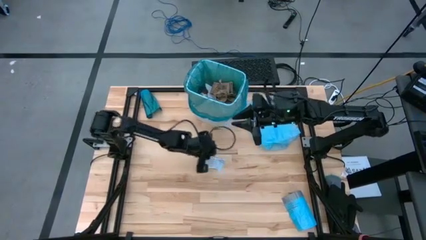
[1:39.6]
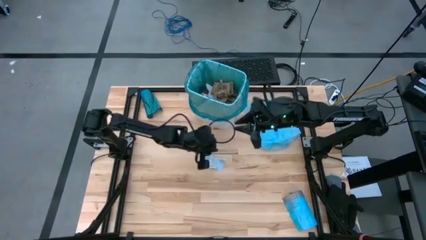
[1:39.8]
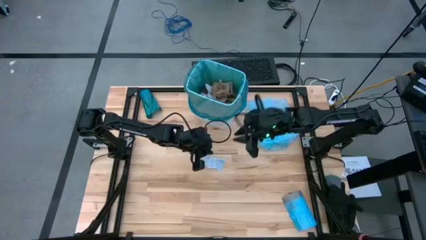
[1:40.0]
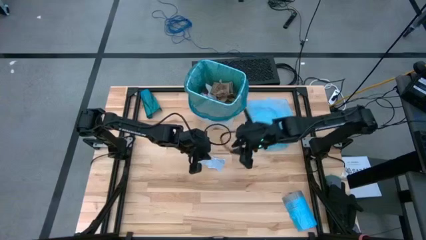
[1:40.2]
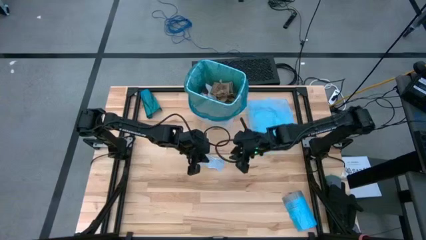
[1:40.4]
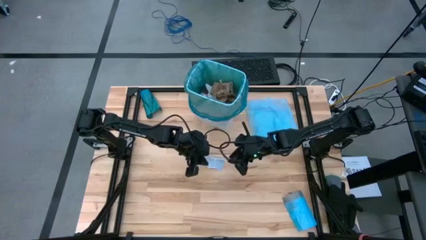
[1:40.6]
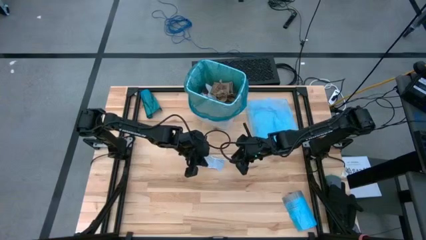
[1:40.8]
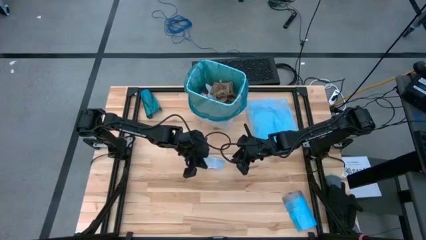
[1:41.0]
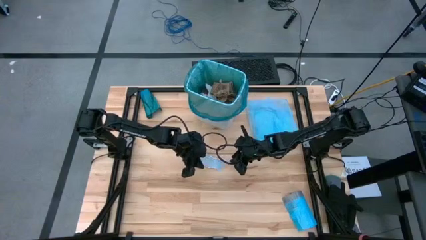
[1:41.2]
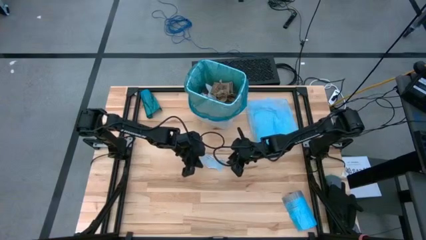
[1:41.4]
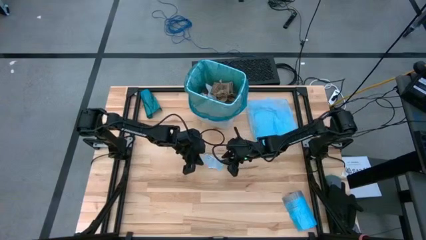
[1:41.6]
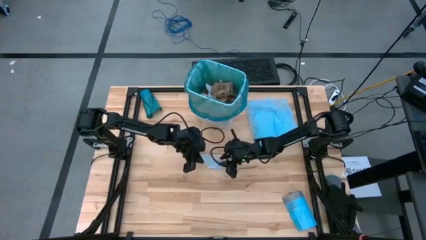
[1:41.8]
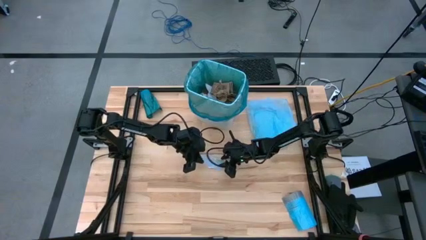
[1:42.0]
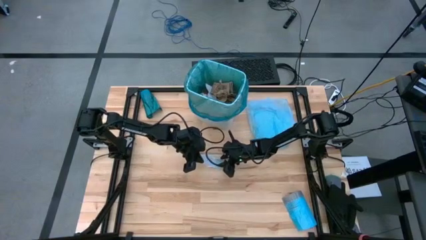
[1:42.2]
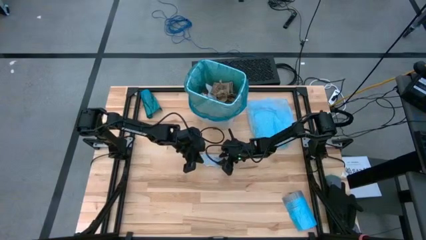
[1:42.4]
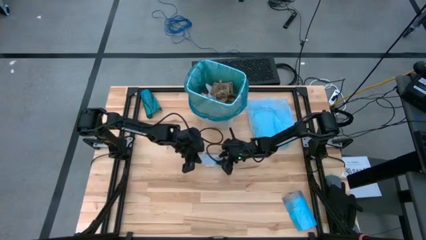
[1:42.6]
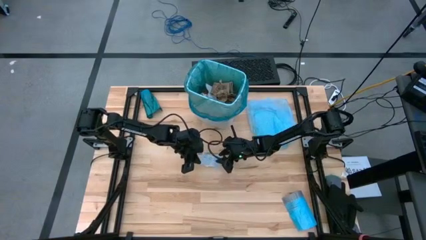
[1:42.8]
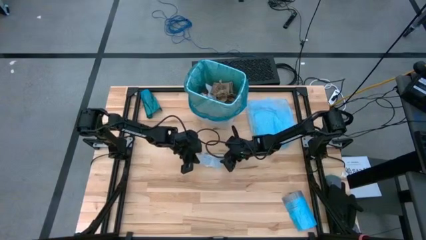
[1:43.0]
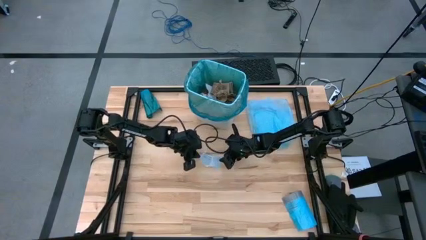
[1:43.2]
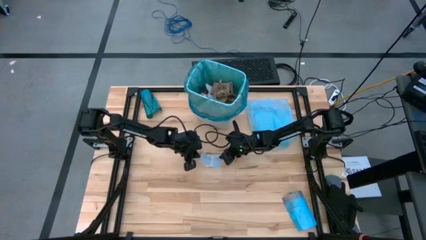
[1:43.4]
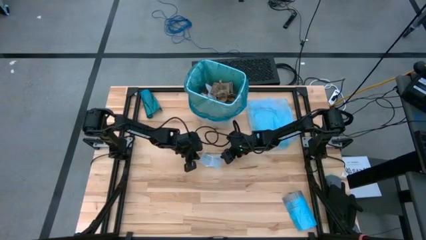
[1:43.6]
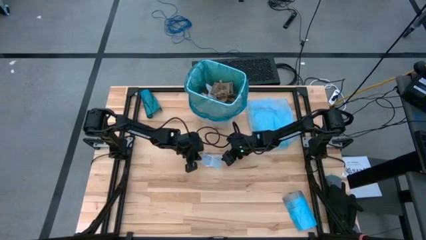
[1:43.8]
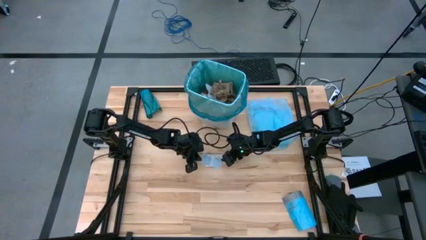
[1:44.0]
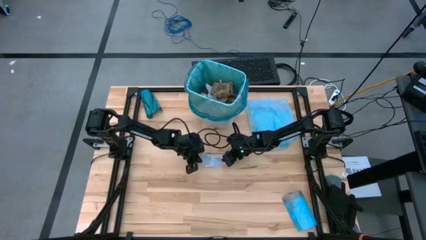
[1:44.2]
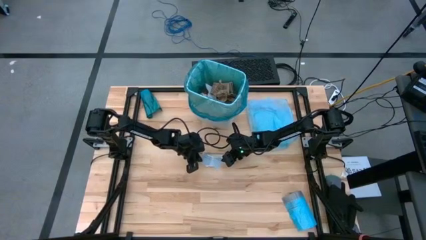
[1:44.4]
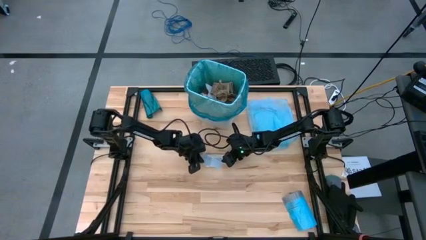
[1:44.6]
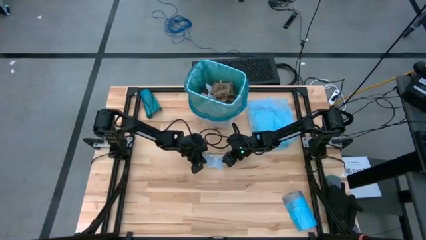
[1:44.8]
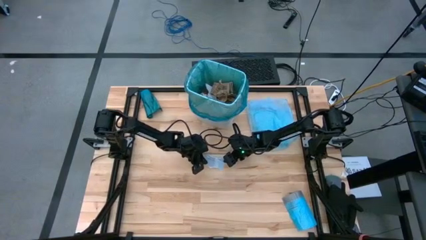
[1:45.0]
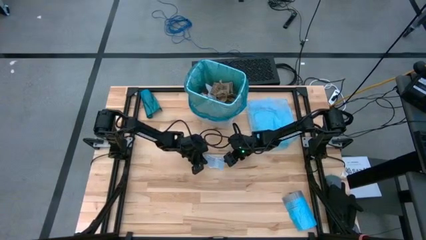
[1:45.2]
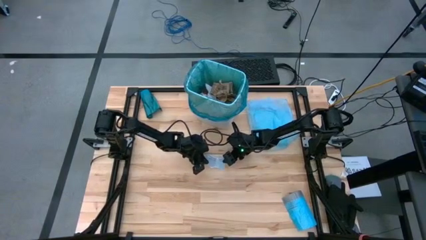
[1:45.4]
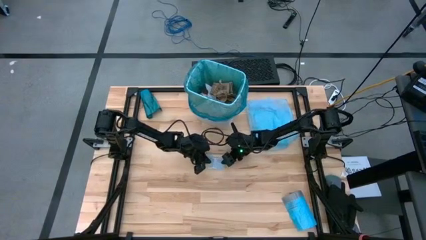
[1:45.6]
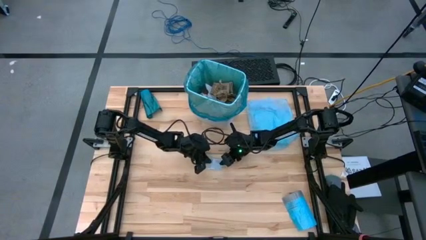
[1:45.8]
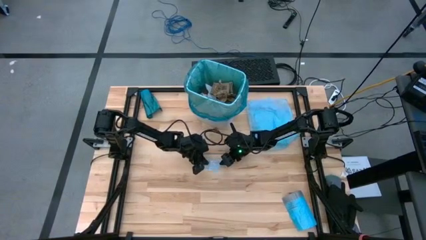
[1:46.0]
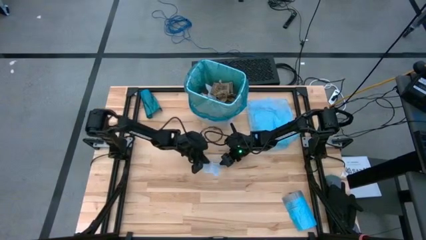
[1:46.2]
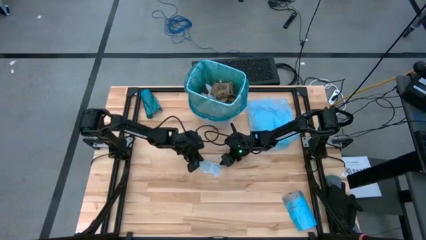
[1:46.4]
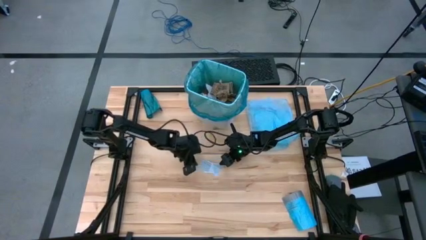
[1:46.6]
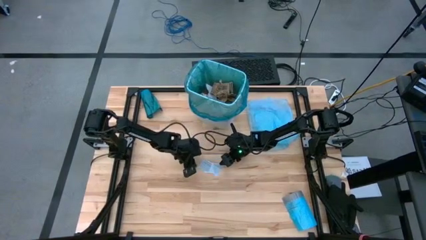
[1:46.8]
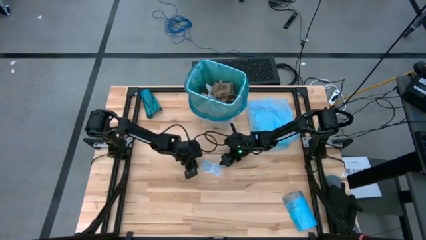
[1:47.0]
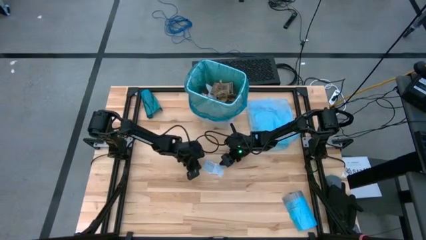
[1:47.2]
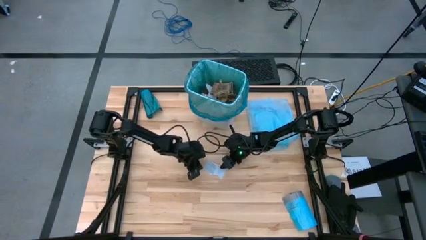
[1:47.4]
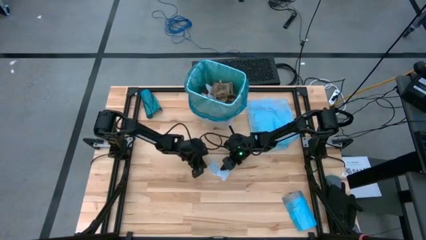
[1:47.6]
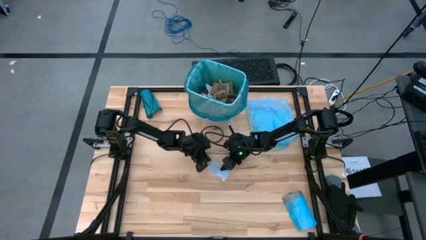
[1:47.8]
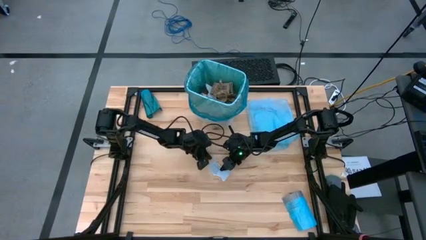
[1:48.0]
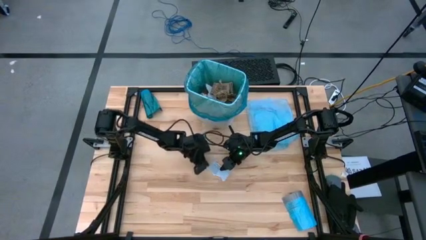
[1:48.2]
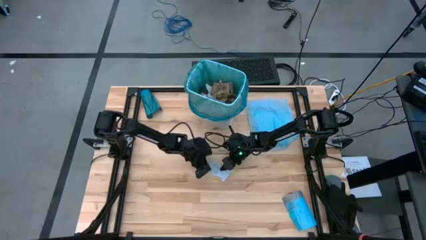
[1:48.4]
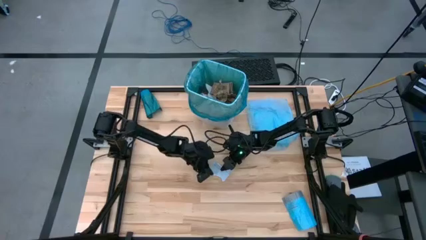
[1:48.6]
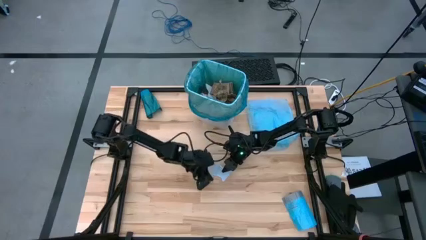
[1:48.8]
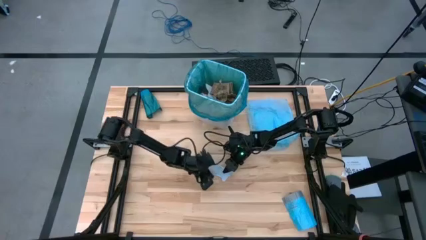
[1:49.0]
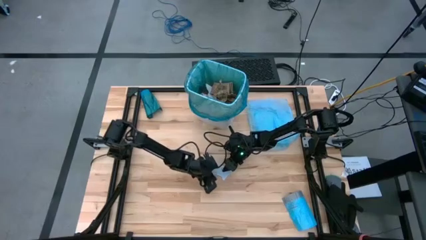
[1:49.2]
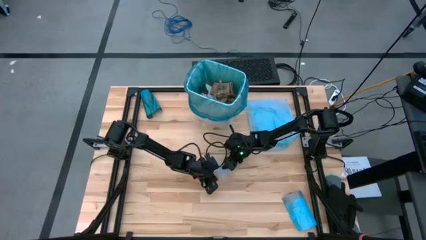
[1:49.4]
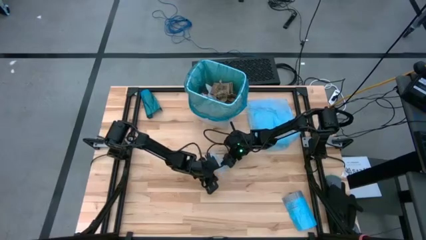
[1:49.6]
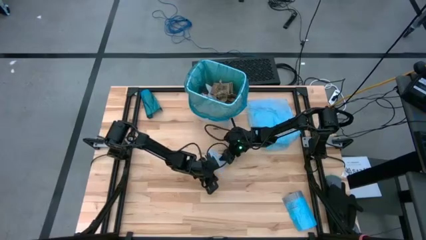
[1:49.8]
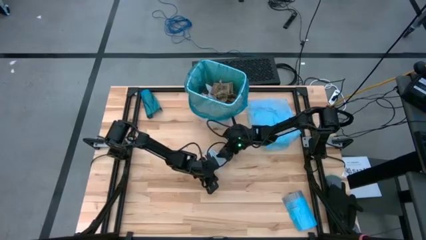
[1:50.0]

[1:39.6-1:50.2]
Task: place trash/remove bag and relplace
Put the white paper into the blue trash bag inside the white trash bin

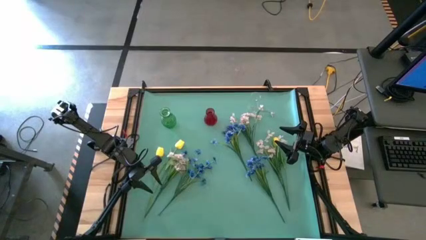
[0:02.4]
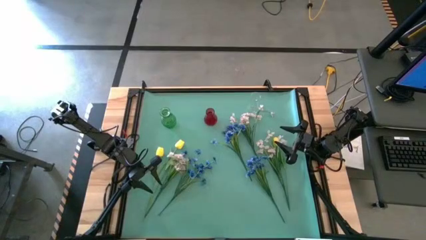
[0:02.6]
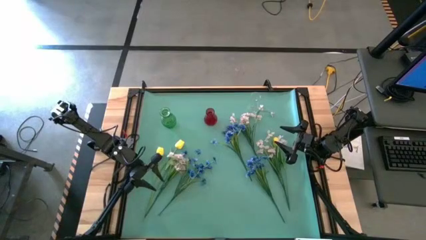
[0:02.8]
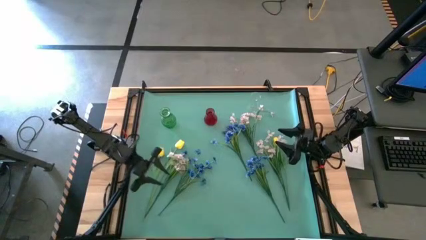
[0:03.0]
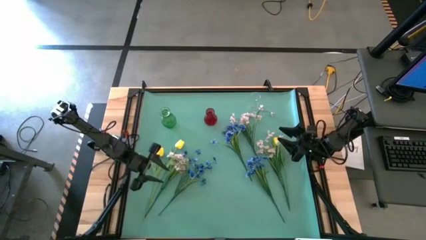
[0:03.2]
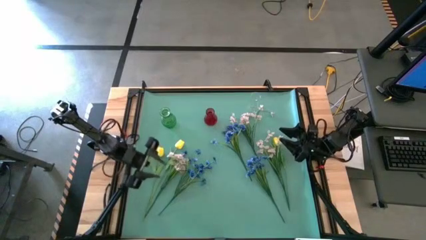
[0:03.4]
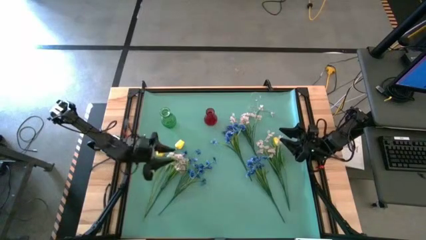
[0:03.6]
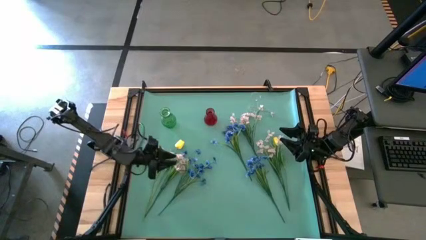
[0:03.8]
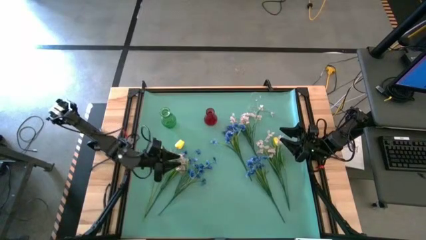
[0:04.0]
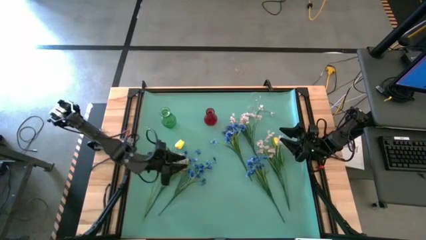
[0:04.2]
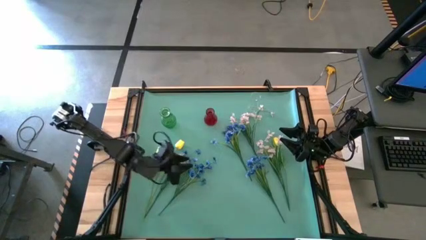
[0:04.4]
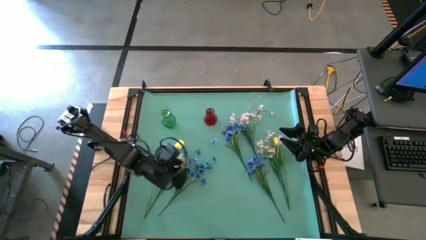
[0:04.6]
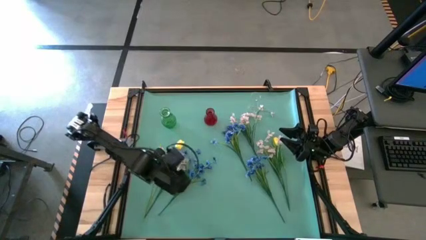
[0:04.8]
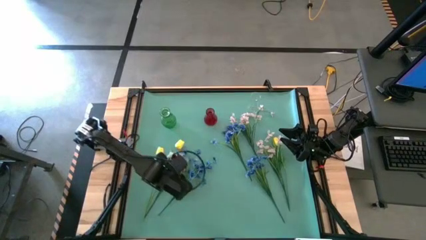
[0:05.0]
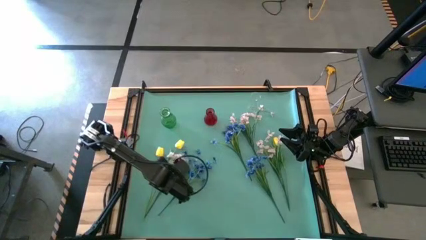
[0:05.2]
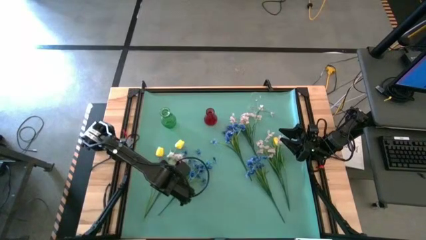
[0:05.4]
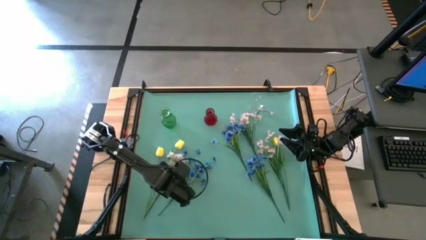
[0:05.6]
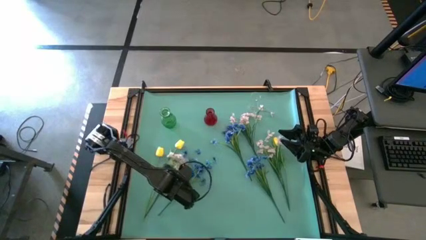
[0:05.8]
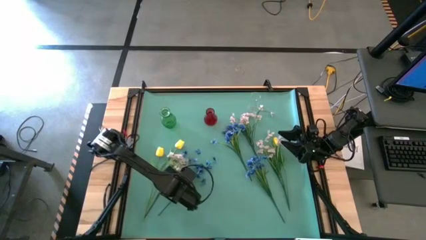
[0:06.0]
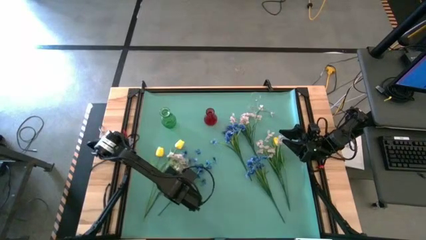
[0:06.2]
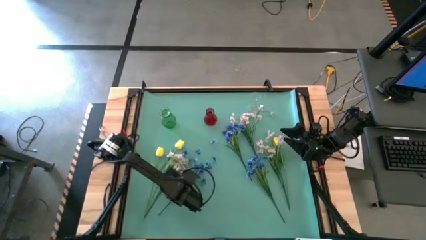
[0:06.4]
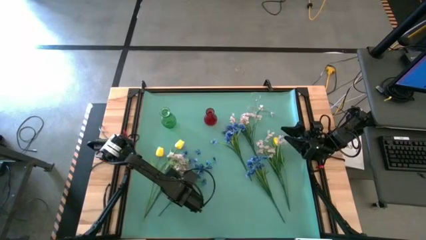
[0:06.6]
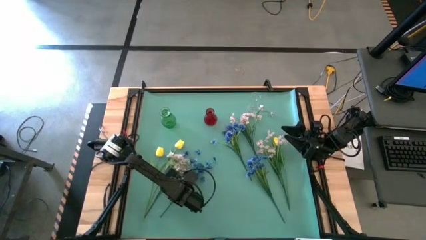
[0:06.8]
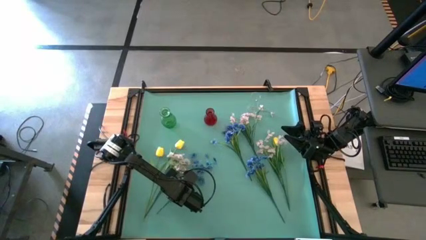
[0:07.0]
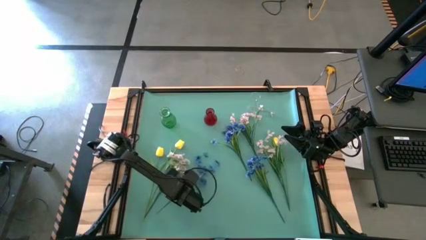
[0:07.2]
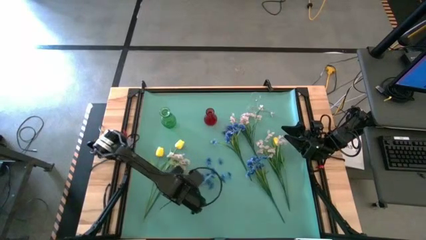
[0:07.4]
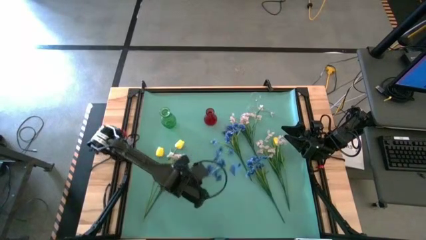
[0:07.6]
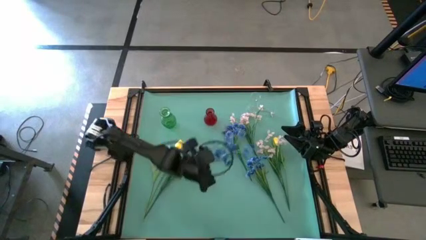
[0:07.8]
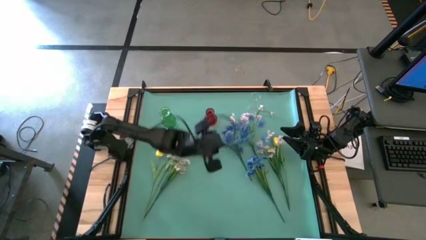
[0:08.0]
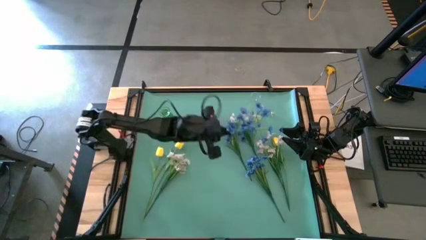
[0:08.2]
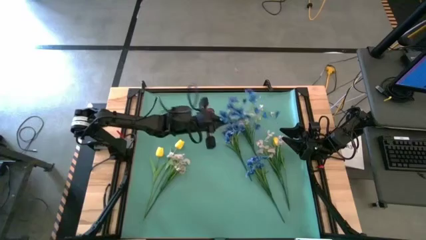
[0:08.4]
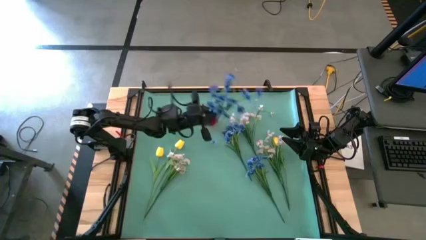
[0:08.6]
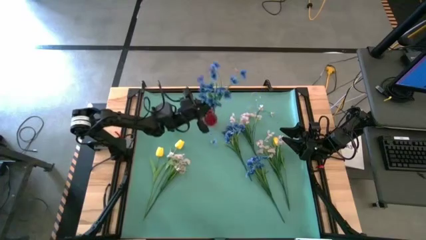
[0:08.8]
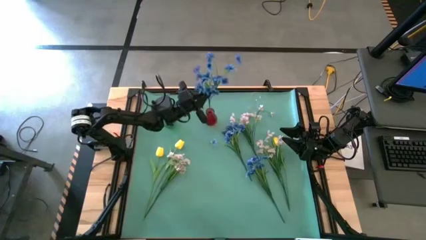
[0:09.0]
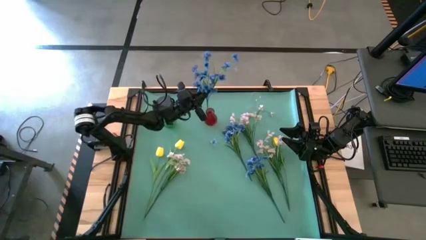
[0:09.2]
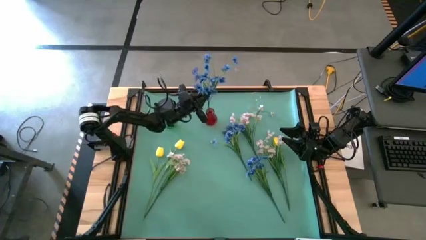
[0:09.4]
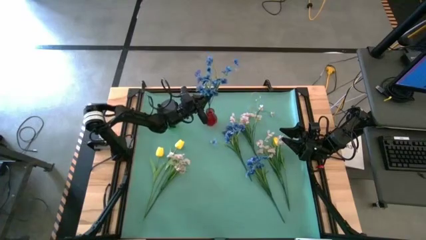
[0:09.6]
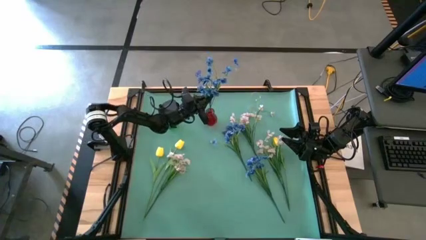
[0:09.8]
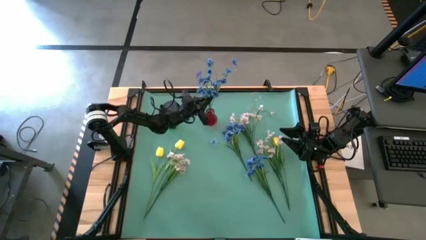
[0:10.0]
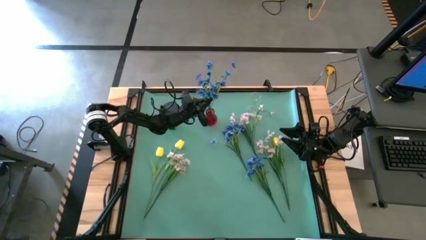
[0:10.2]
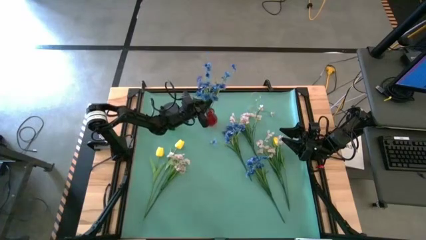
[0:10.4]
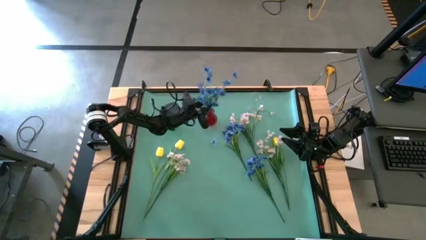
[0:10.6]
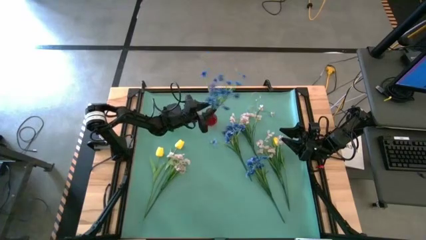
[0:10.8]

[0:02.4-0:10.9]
Task: Sort flowers into vase by color
Put the left blue flower into the red vase
